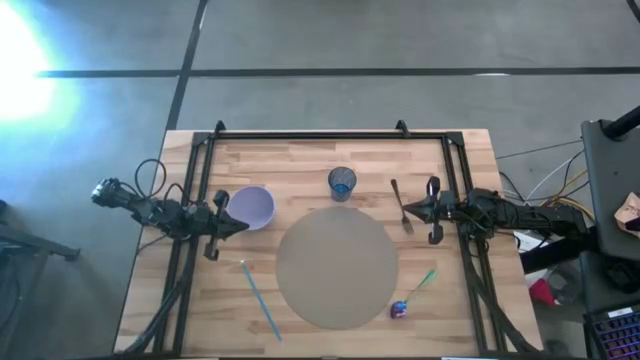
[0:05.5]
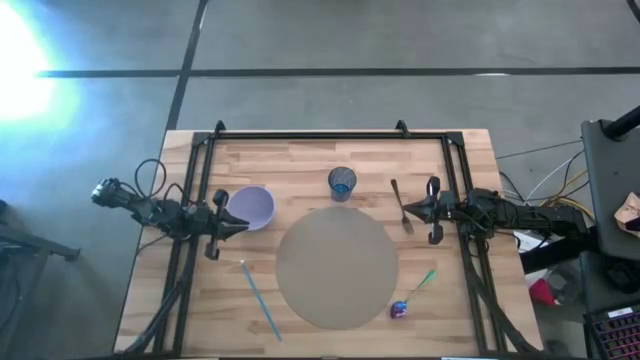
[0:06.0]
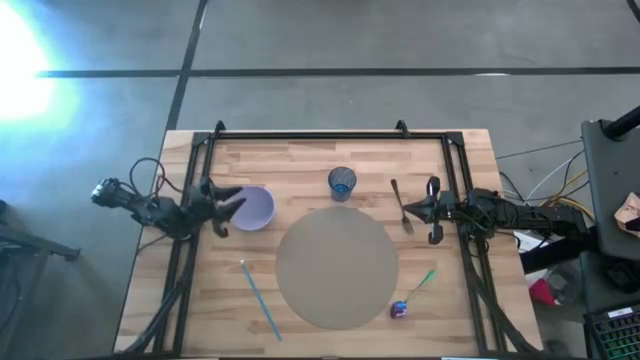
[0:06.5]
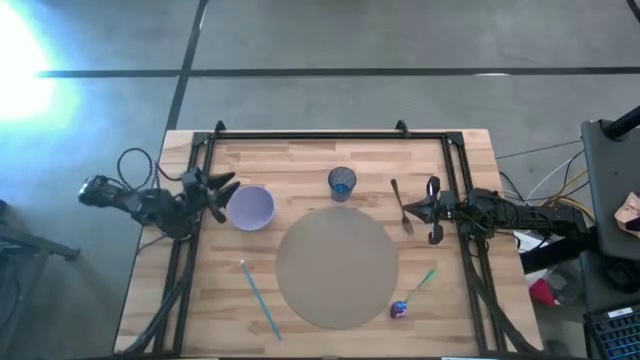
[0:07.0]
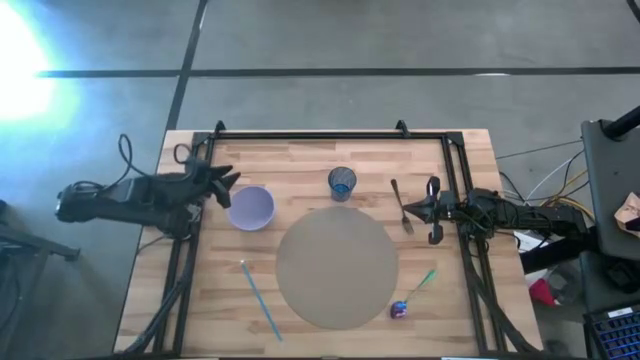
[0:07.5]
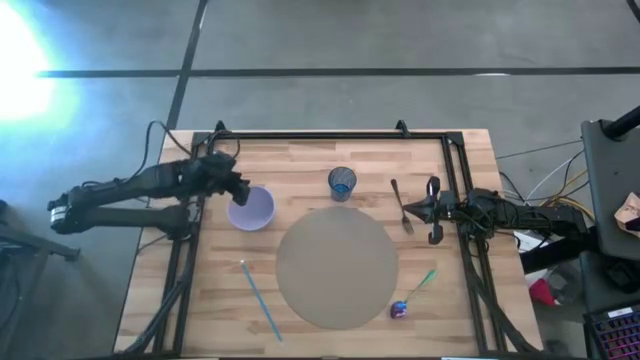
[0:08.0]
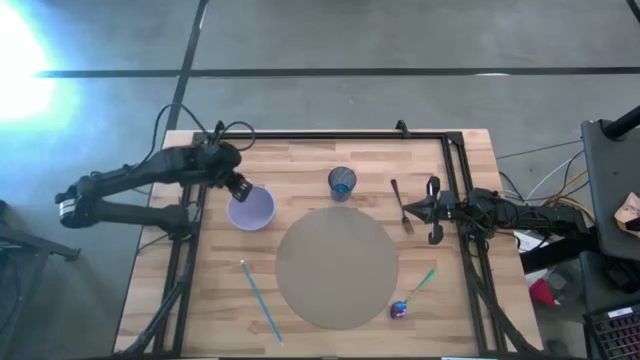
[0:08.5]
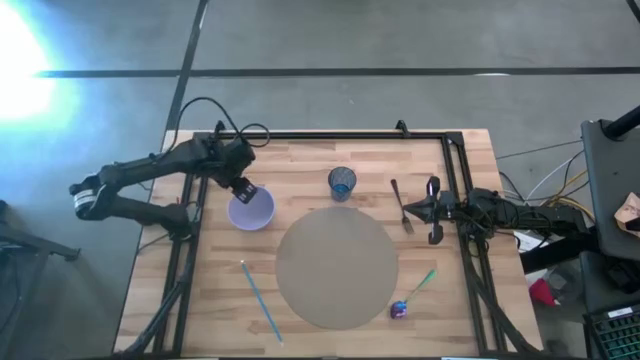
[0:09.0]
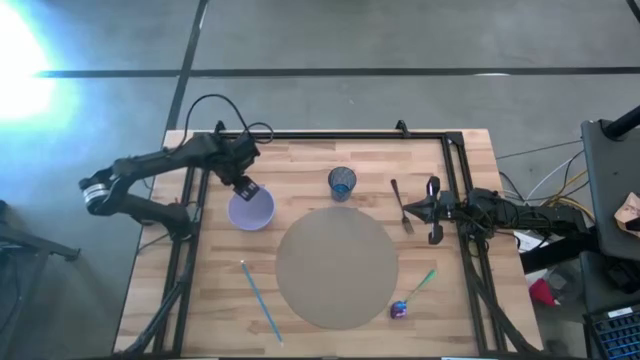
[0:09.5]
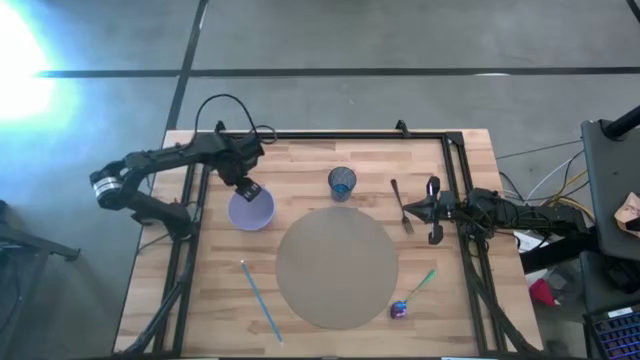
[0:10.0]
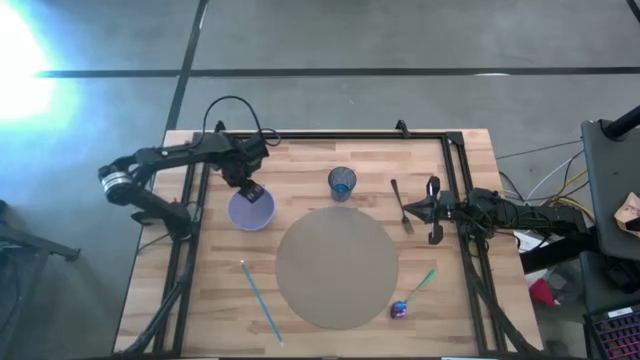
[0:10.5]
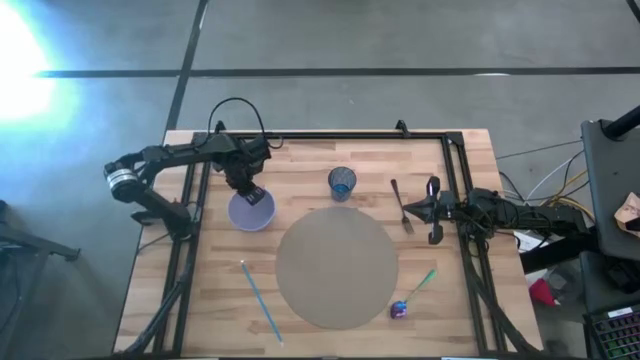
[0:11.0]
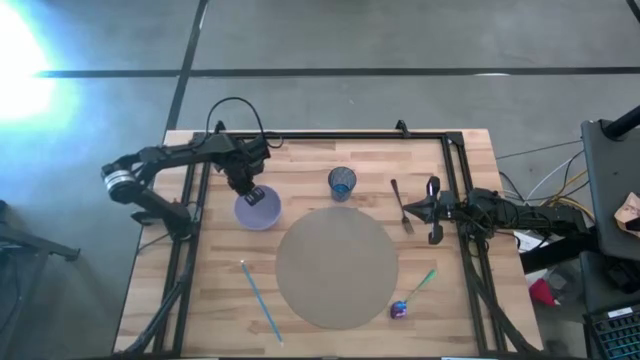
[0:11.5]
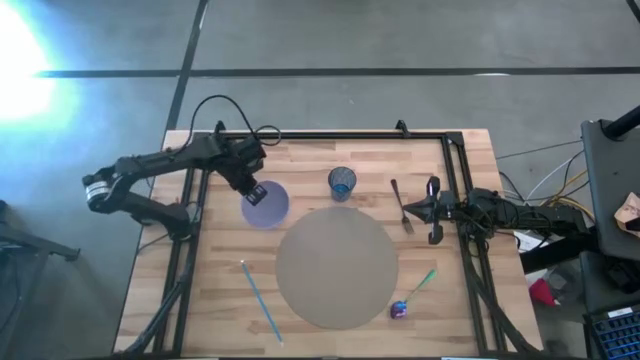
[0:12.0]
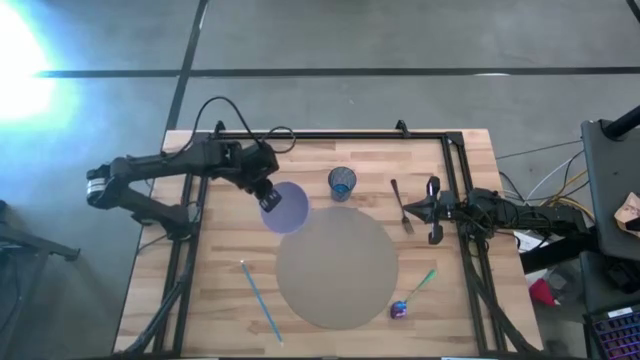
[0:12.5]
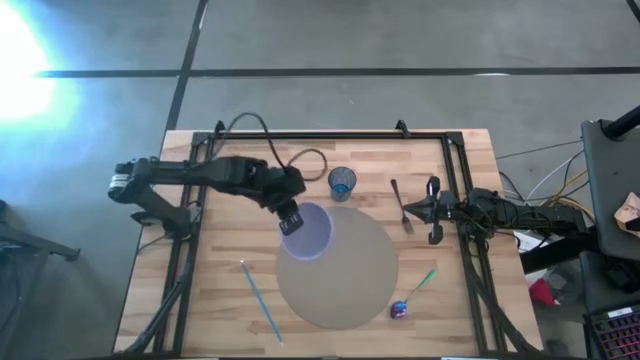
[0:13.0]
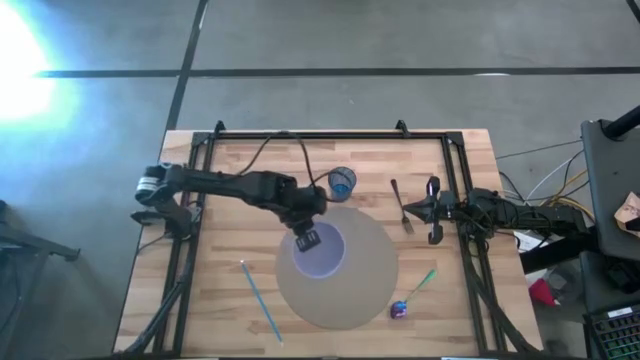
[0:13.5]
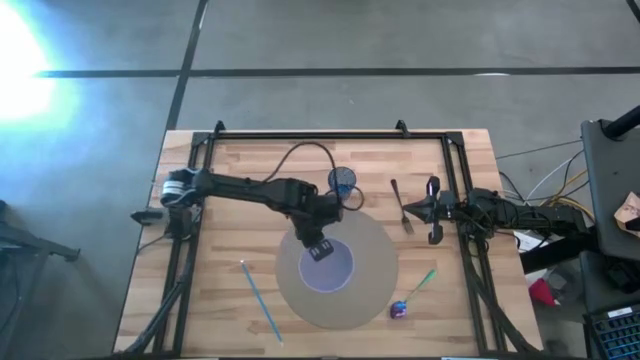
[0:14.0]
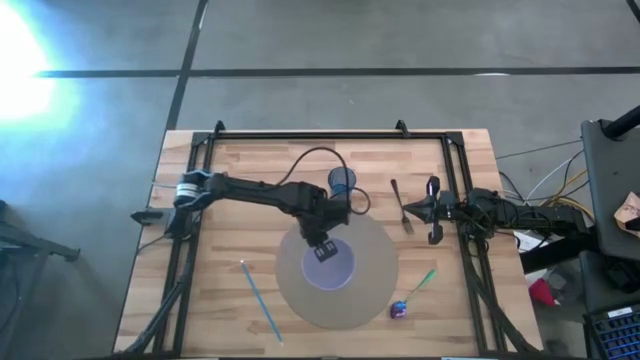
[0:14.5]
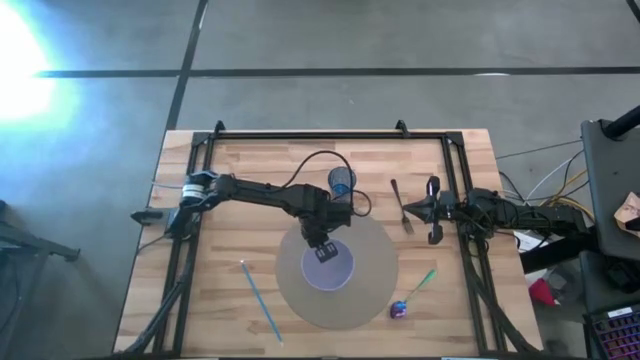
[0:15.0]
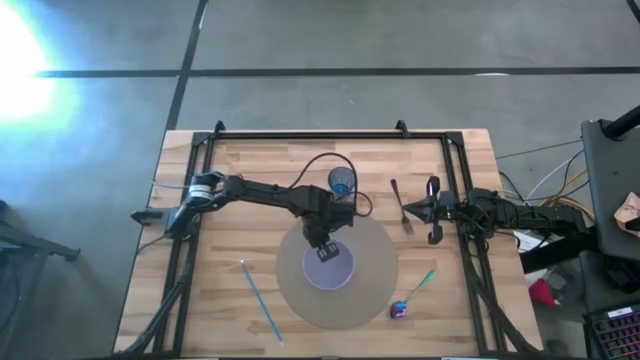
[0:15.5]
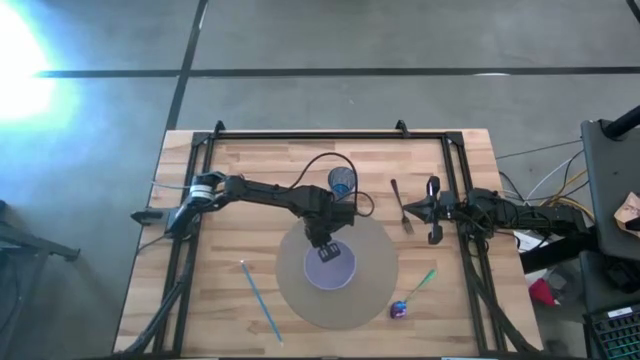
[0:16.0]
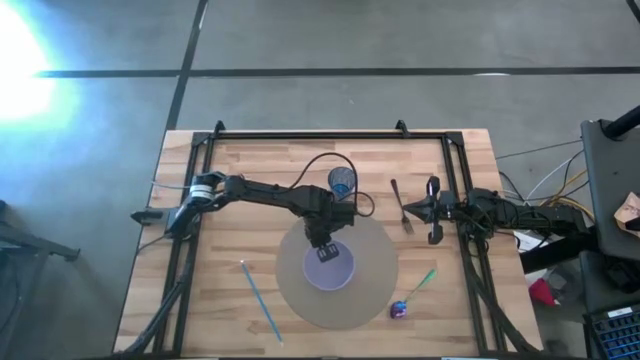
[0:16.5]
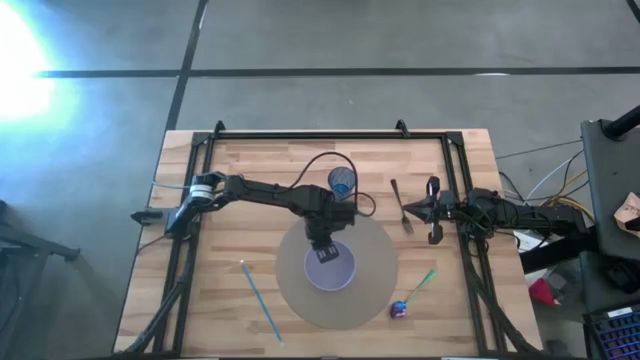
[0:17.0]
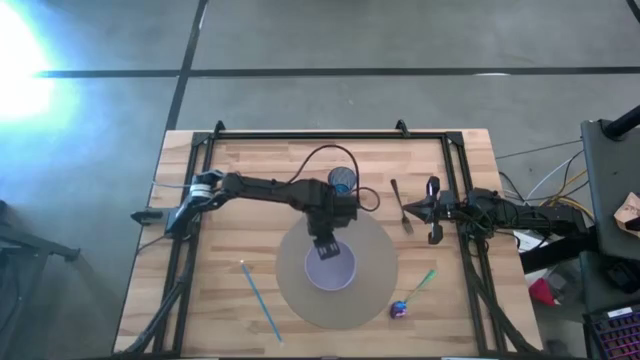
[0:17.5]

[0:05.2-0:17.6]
Task: Pick & Place Utensil
Put the violet bowl on the gray mat

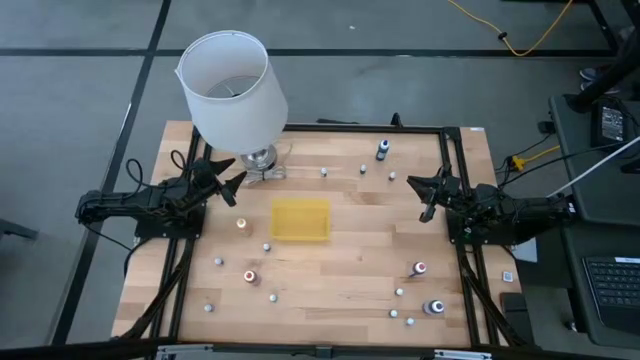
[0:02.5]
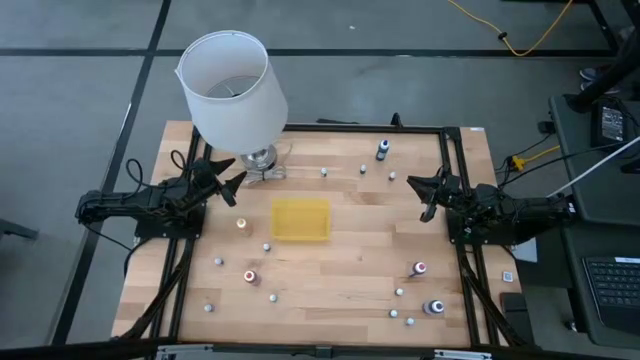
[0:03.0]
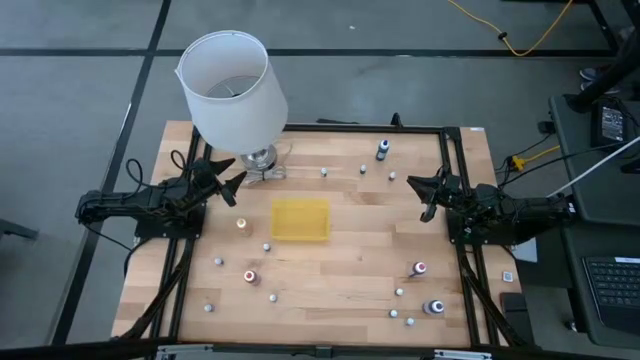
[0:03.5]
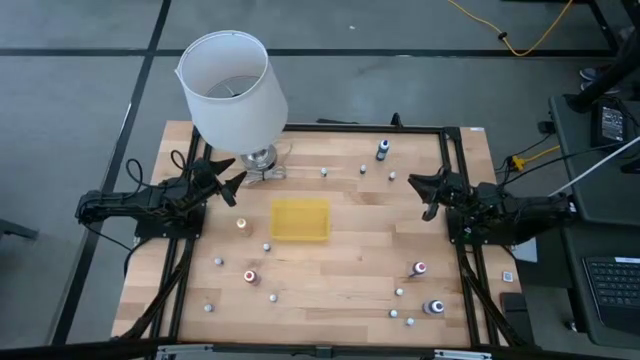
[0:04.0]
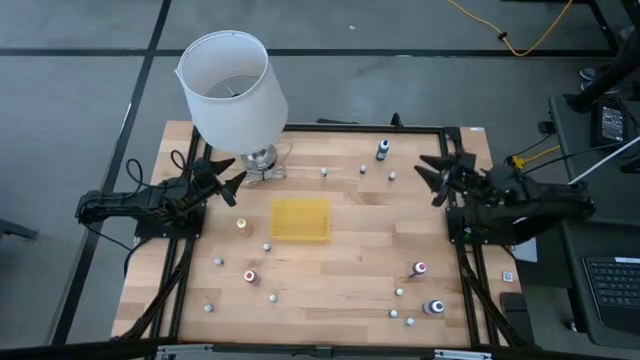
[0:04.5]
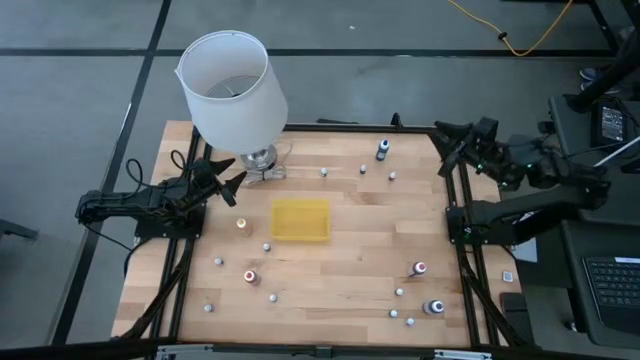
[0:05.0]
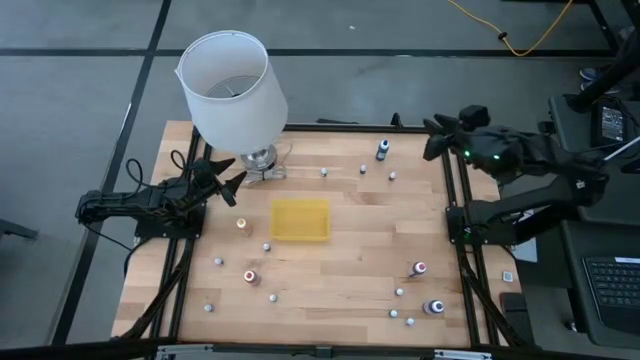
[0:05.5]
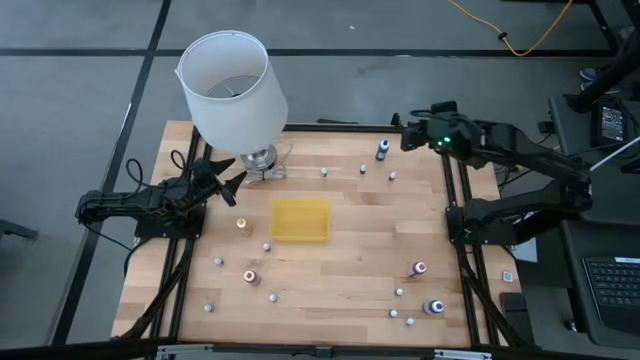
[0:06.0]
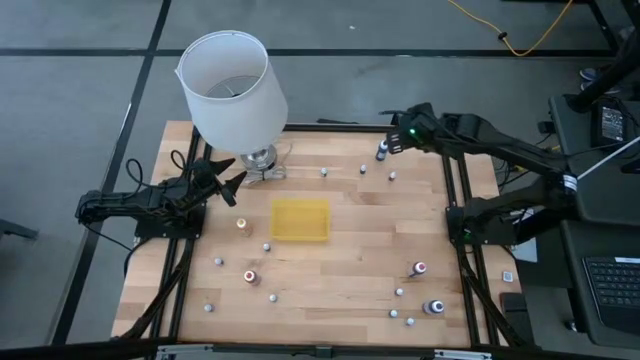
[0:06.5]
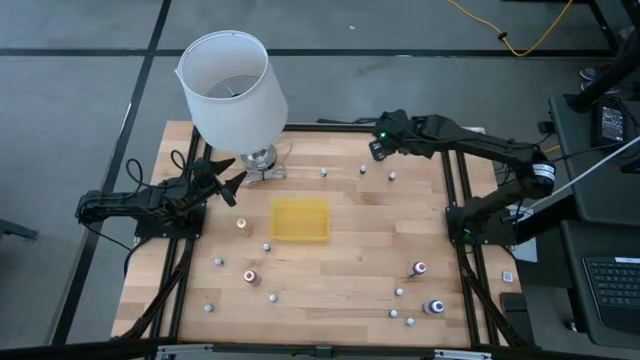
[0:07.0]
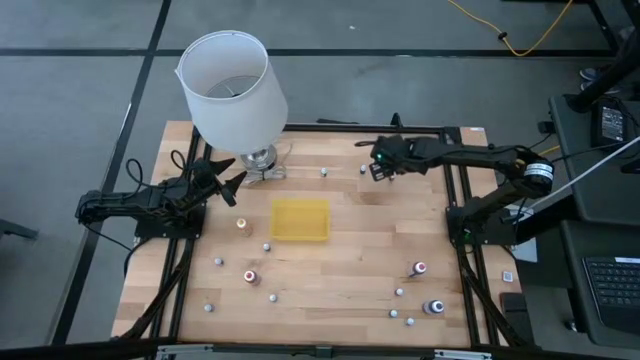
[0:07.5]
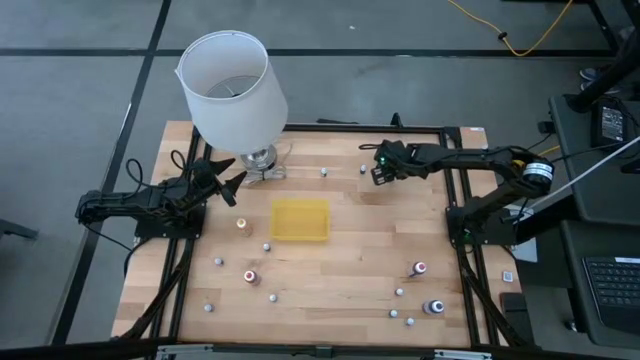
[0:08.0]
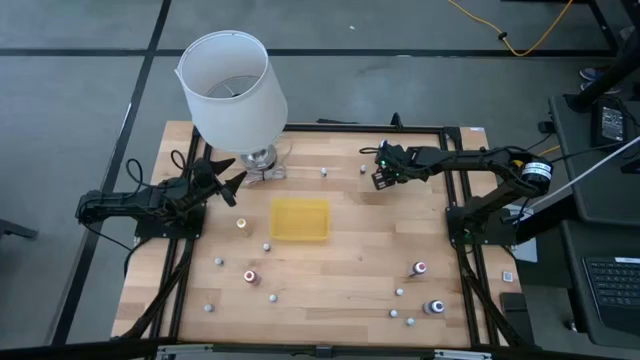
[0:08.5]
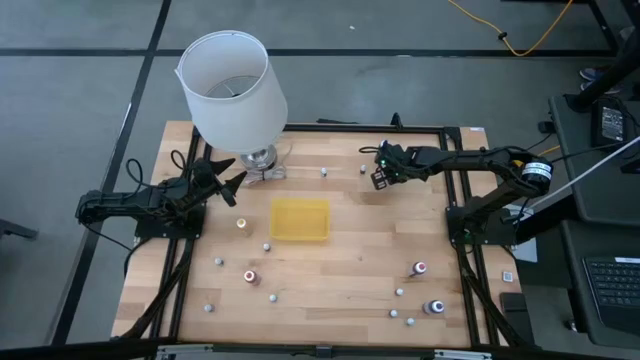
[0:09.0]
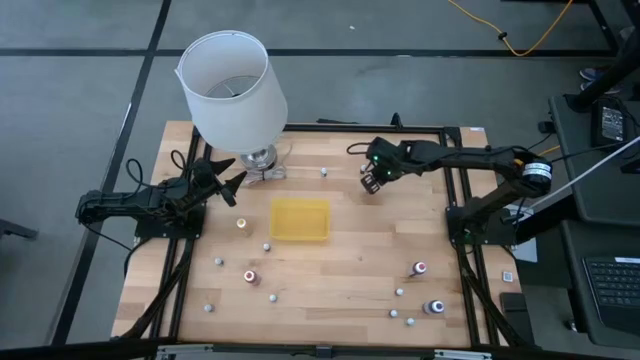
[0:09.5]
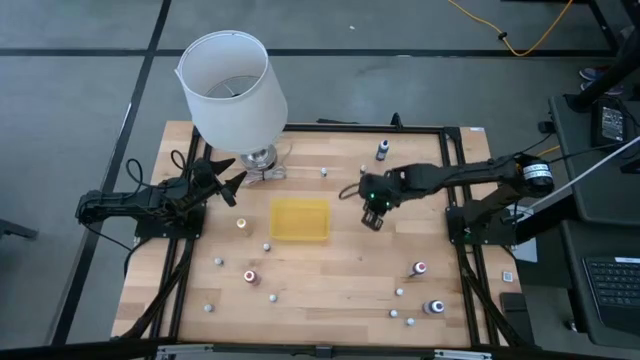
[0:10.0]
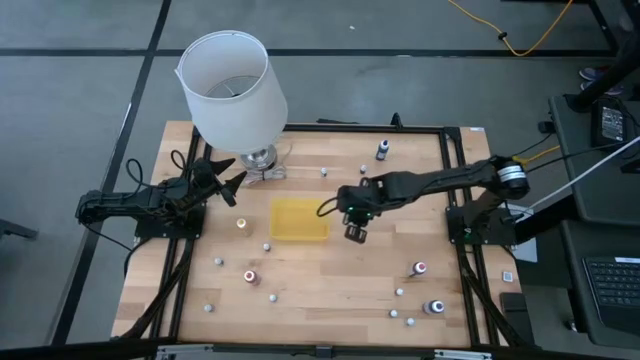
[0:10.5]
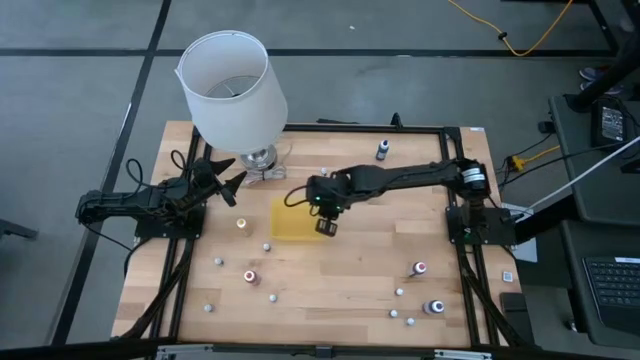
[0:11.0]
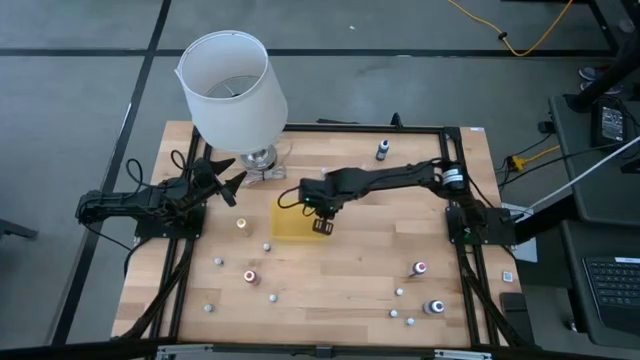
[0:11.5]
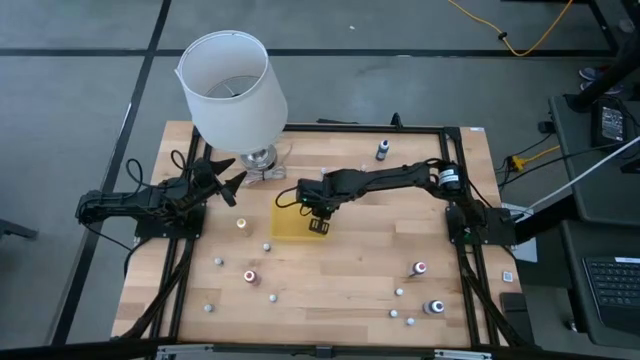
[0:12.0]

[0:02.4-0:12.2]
Task: Pick & Place food coloring
Put the red food coloring bottle into the yellow bin
